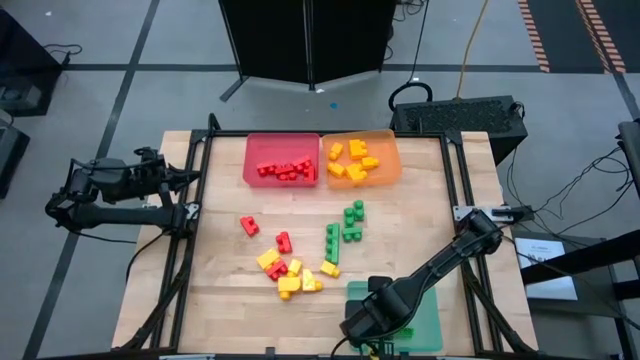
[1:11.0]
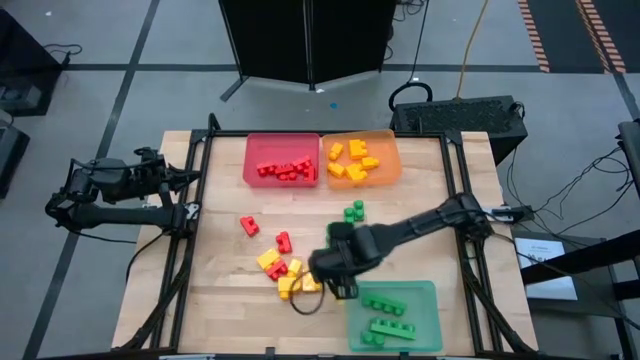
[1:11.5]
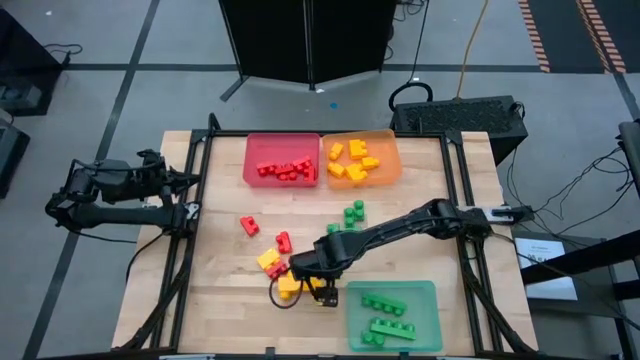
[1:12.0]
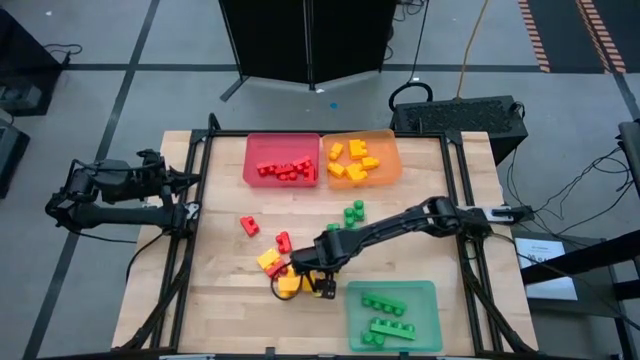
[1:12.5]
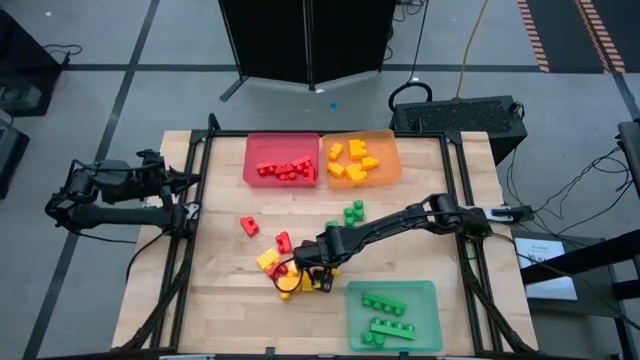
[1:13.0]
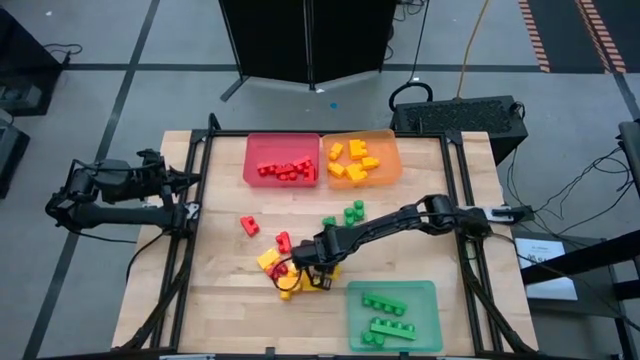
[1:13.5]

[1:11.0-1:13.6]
Task: Sort blocks
Put the yellow game piece into the orange bin

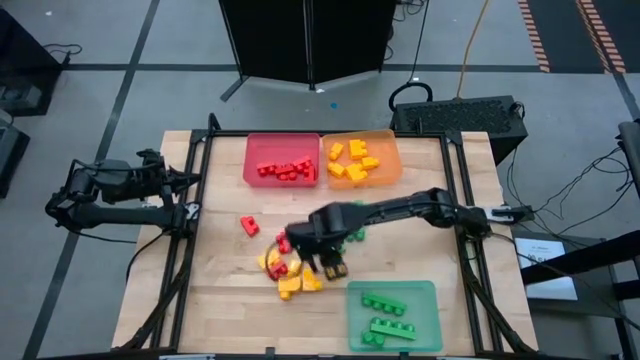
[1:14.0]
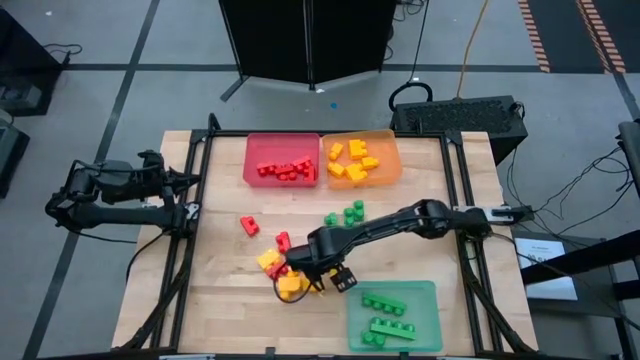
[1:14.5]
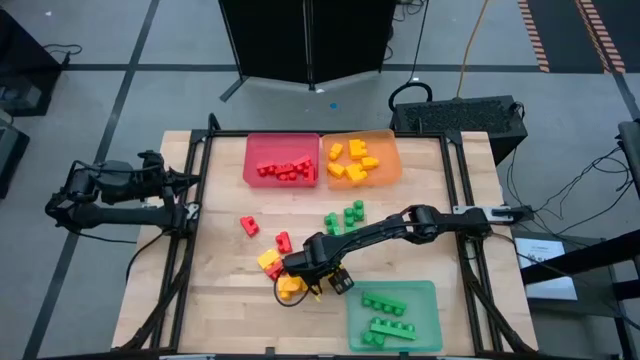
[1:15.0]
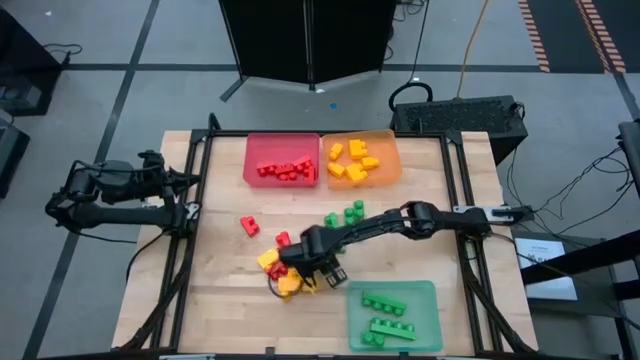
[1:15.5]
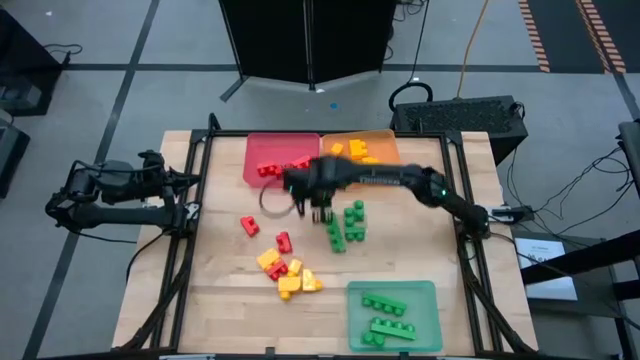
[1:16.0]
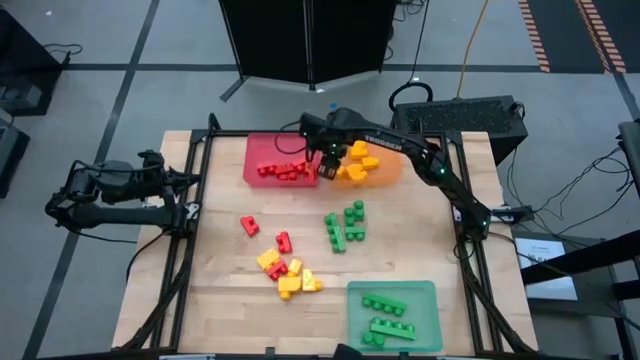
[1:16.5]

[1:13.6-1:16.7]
Put the yellow game piece into the orange bin

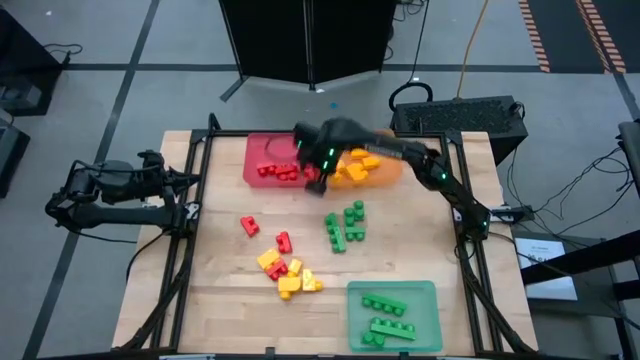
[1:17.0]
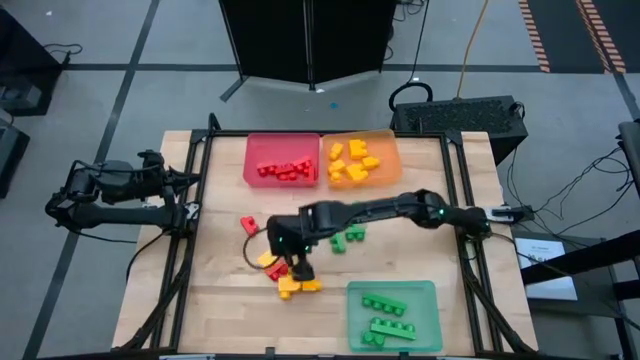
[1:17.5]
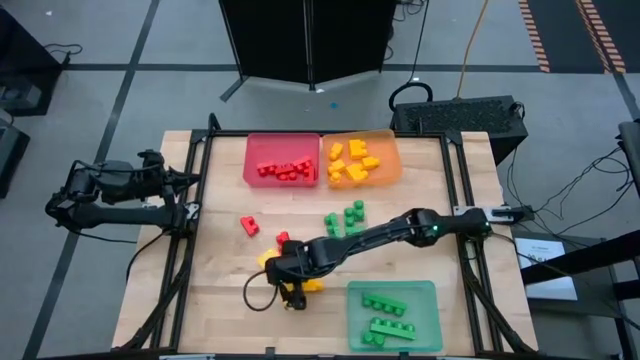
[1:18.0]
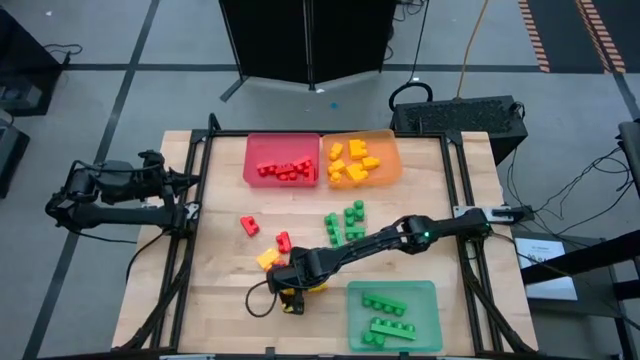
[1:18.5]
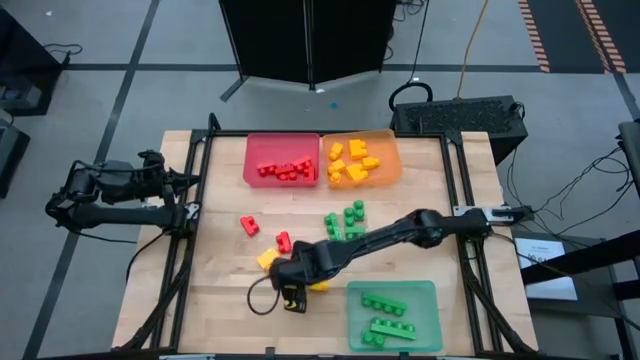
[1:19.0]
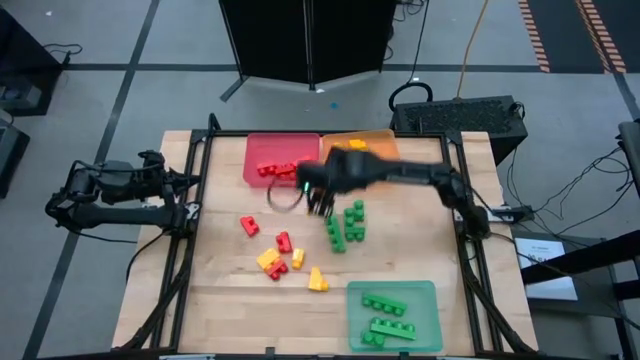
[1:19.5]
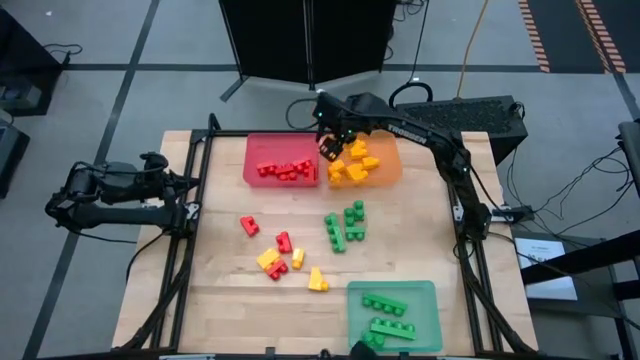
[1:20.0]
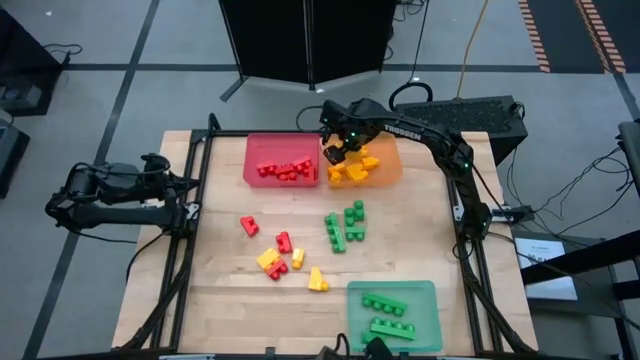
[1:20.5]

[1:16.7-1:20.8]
Put the yellow game piece into the orange bin

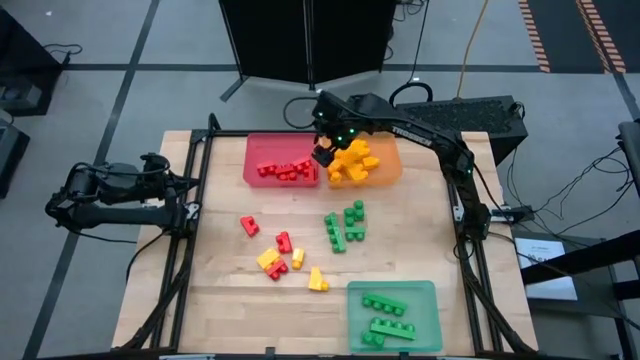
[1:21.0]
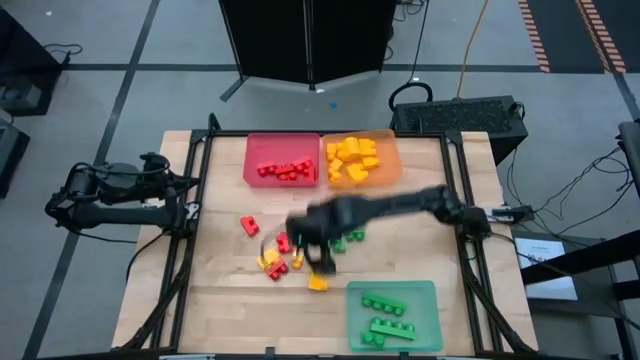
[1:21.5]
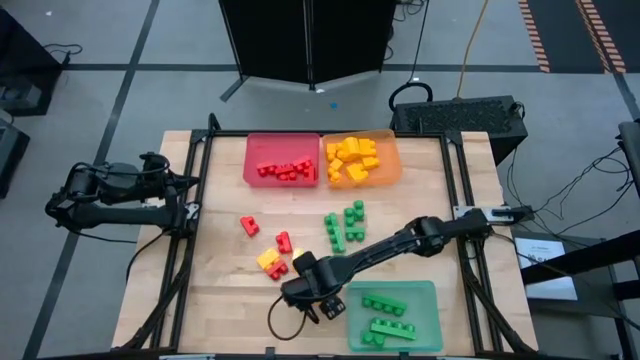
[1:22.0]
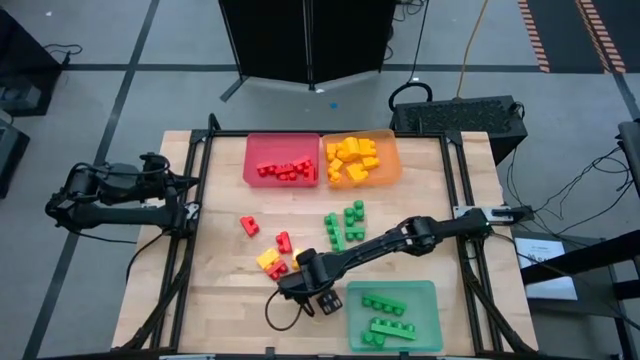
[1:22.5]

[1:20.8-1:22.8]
Put the yellow game piece into the orange bin

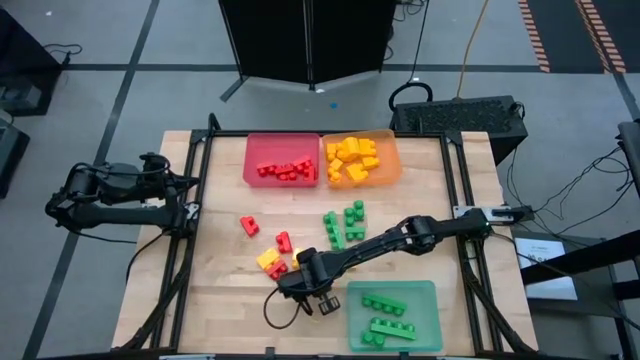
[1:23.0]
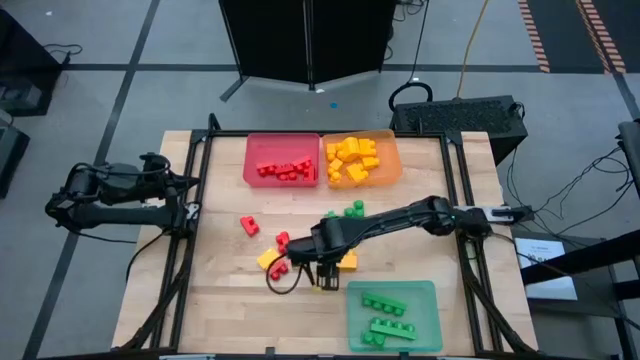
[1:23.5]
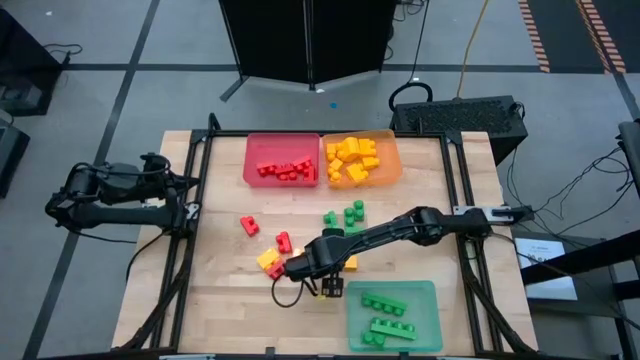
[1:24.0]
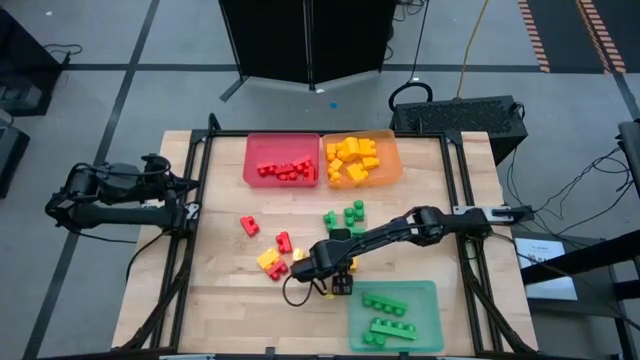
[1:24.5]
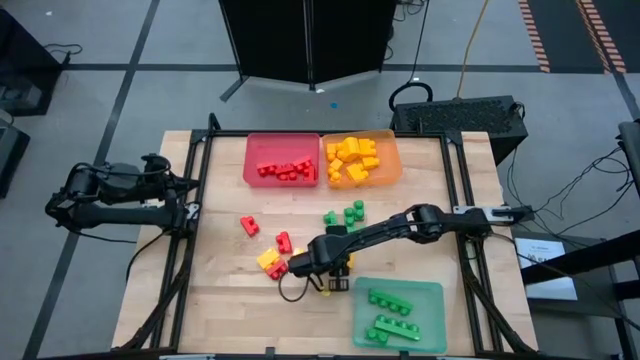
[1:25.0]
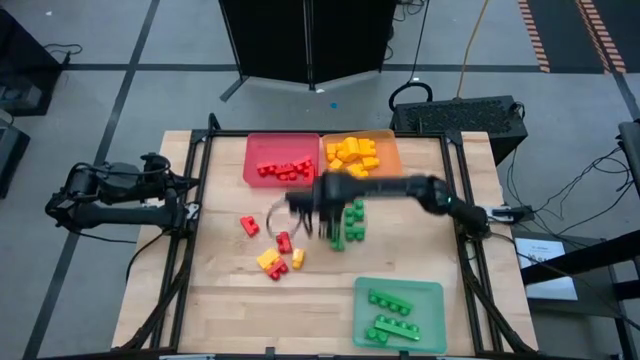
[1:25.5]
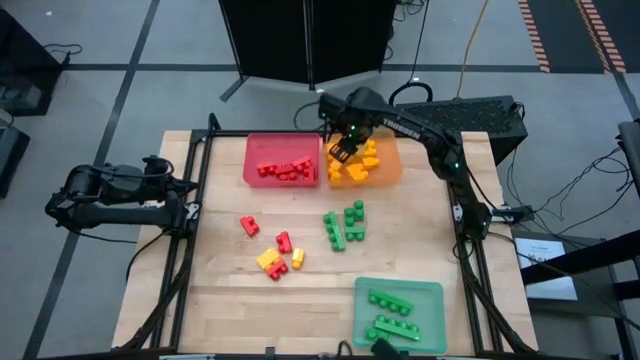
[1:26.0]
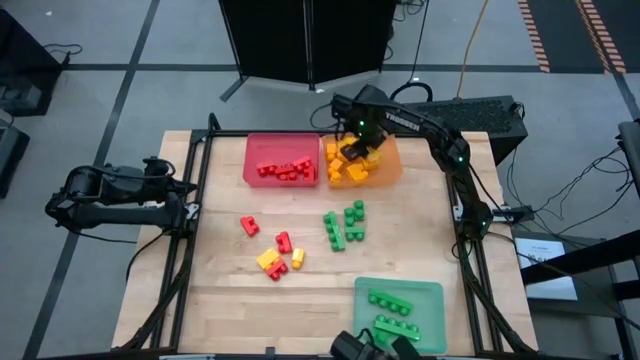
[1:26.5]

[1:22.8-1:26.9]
Put the yellow game piece into the orange bin

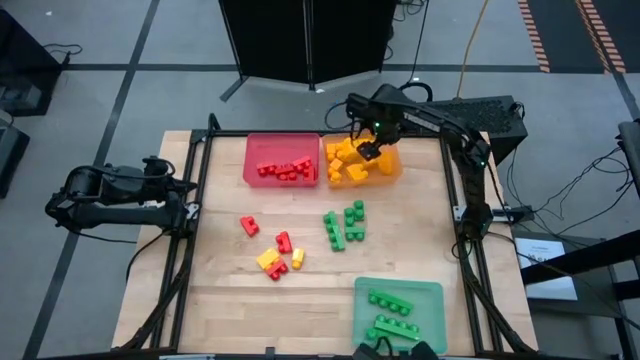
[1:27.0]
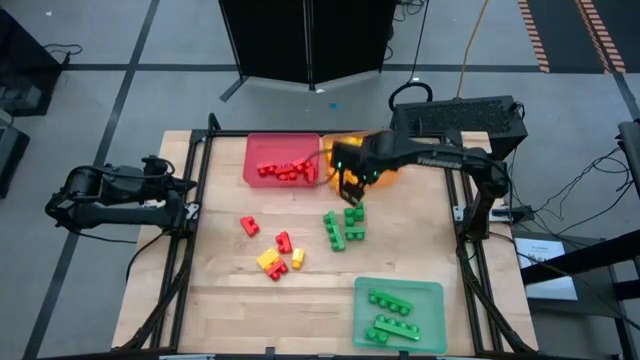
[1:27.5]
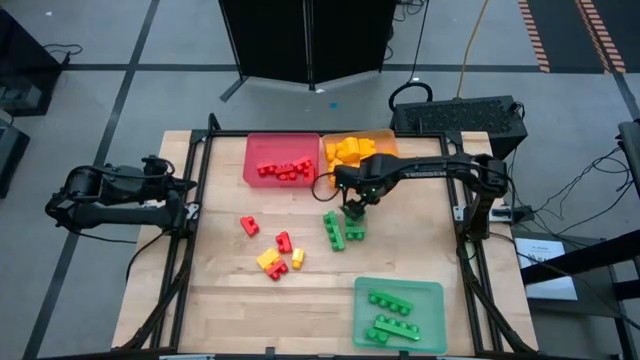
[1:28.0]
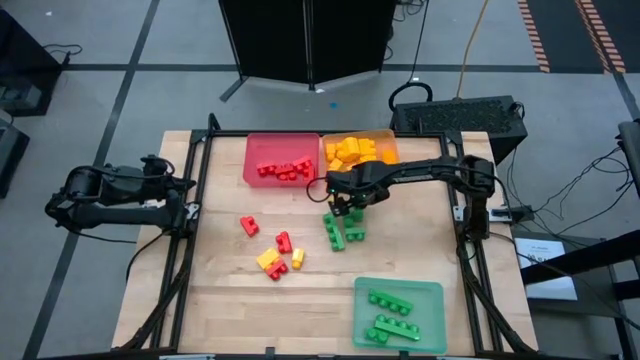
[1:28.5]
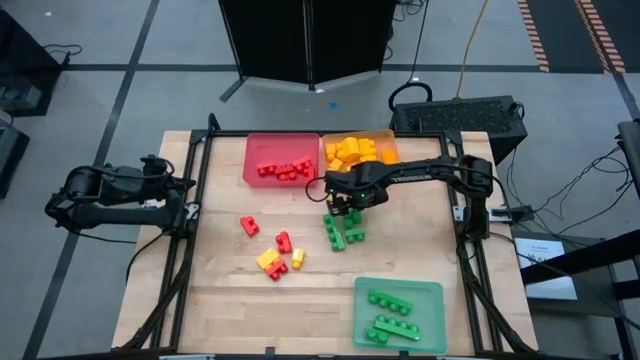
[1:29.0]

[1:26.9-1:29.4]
Put the green game piece into the green bin

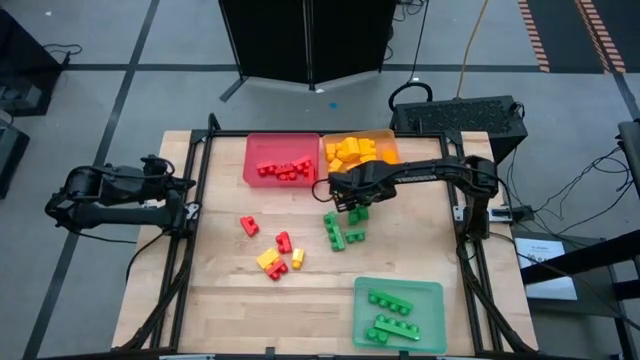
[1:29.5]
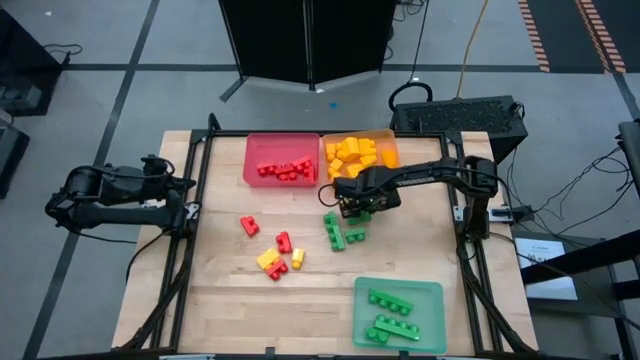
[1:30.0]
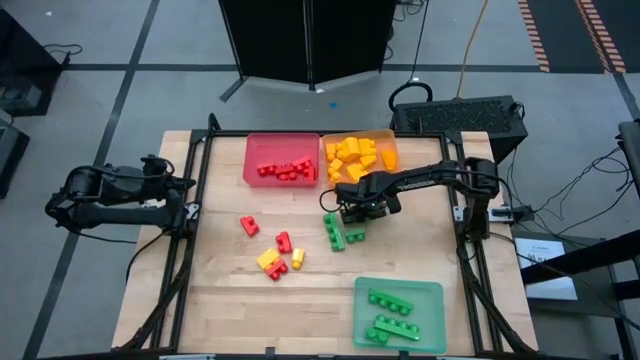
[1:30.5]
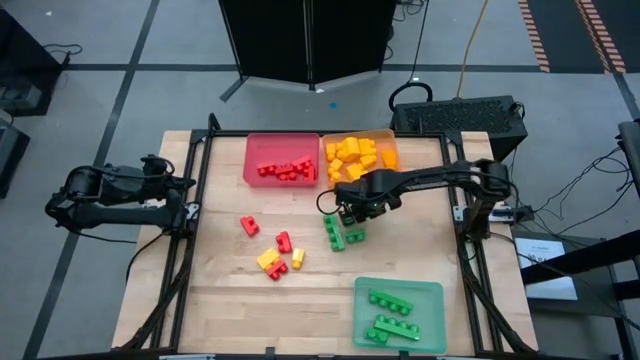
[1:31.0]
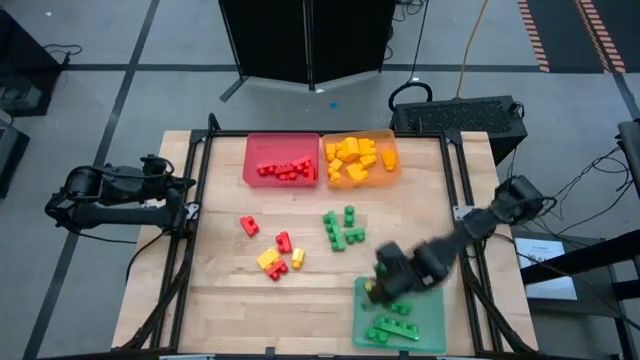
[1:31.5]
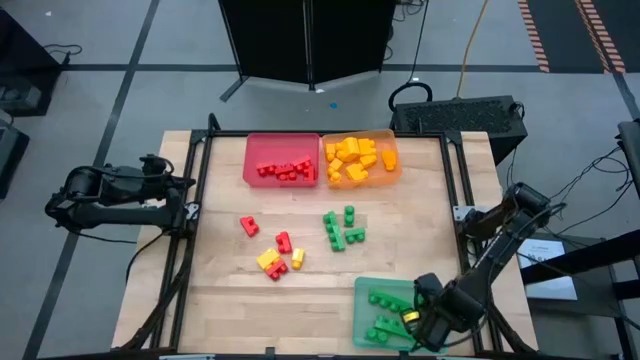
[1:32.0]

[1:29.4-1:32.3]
Put the green game piece into the green bin
